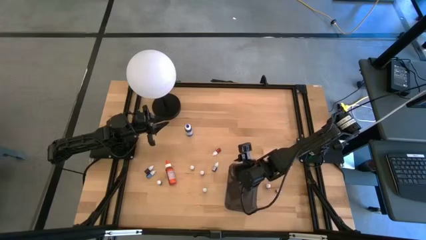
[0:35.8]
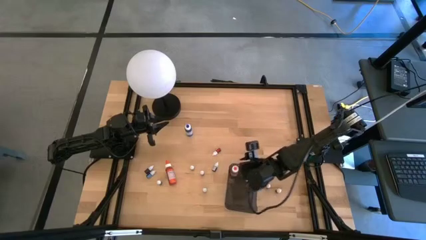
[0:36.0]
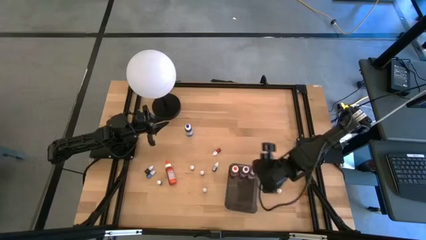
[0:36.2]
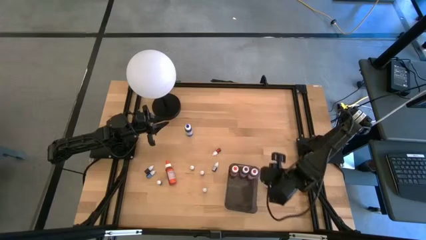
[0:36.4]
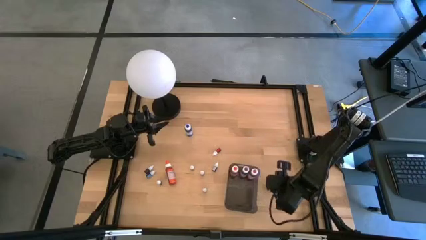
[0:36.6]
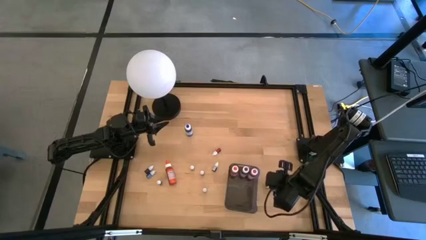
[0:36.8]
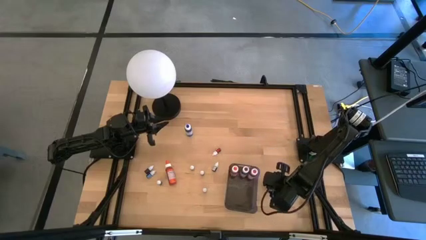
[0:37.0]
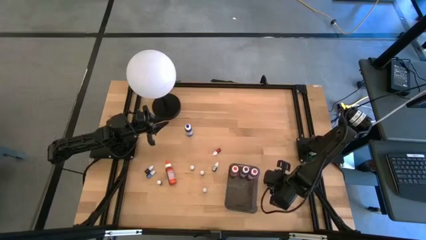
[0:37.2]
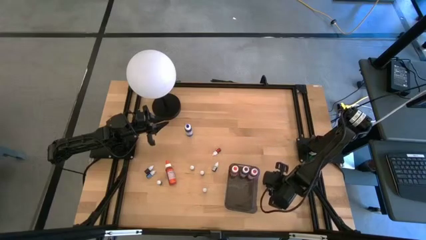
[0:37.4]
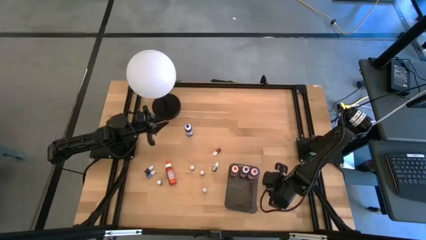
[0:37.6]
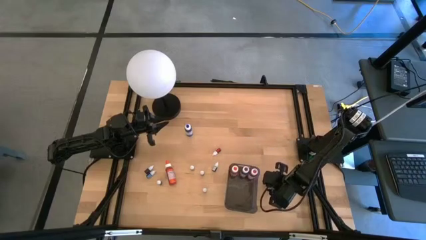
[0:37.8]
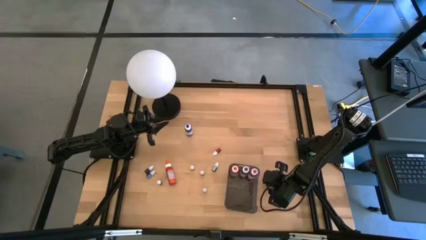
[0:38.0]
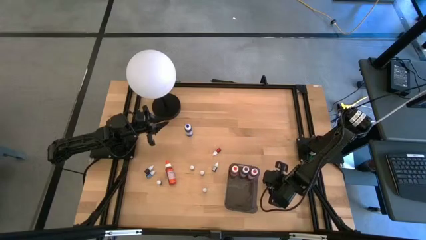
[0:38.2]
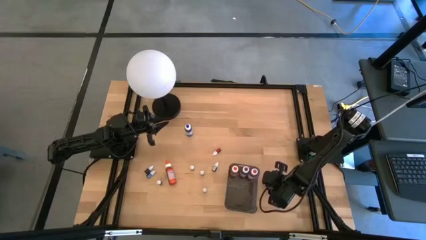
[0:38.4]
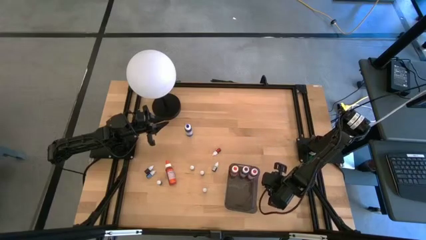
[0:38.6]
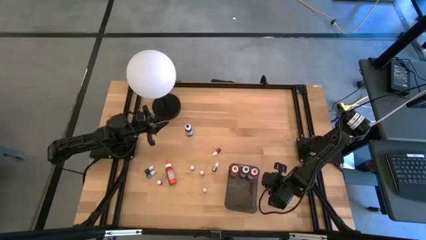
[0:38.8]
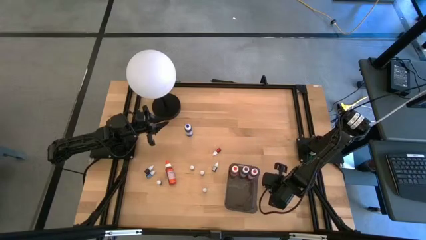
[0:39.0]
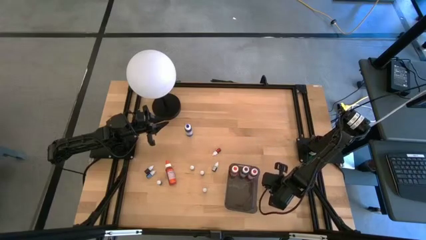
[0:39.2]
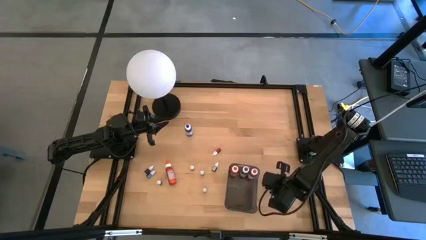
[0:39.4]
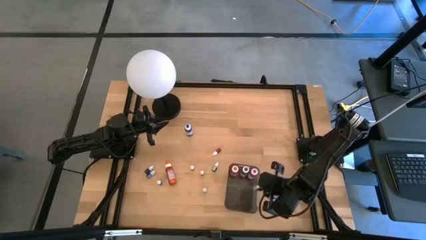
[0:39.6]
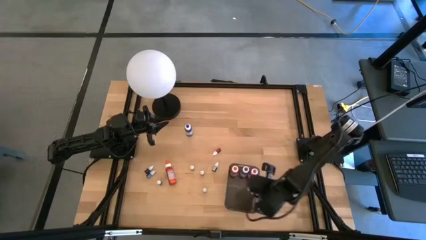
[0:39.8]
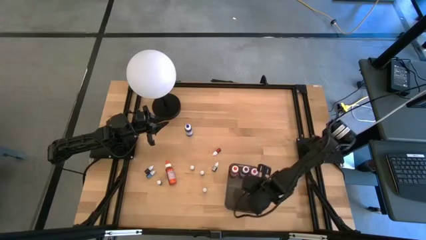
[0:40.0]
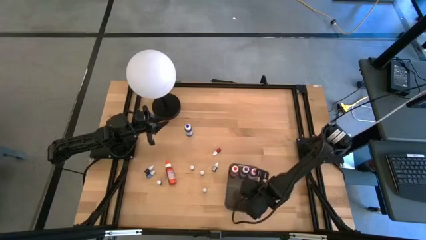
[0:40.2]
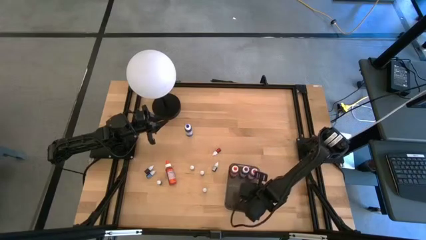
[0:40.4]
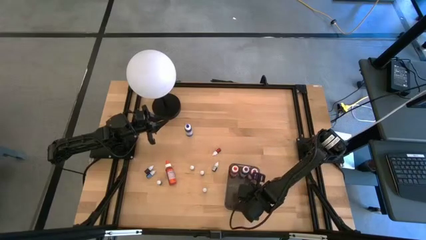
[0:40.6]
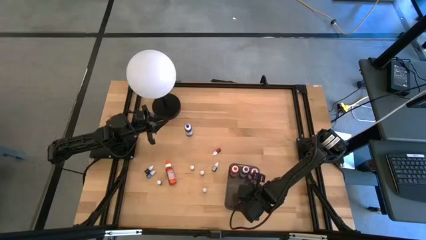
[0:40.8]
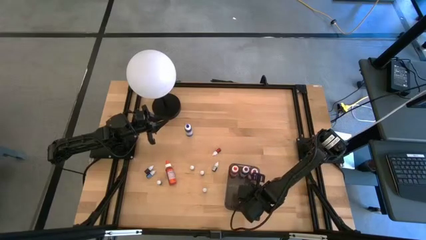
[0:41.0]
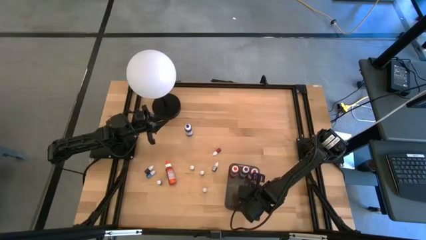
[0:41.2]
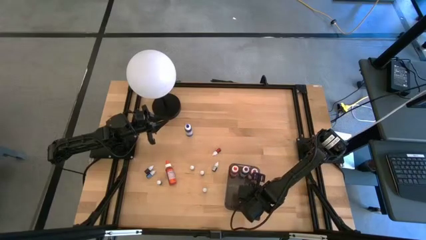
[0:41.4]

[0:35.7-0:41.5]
Task: Pick & Place food coloring
Put the small food coloring bottle into the black bin

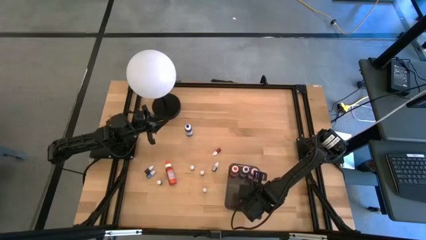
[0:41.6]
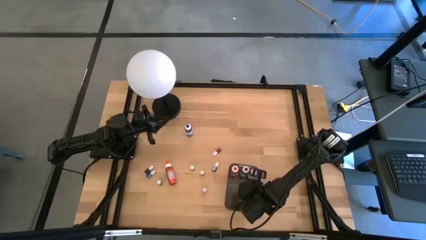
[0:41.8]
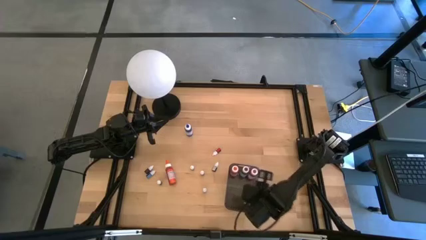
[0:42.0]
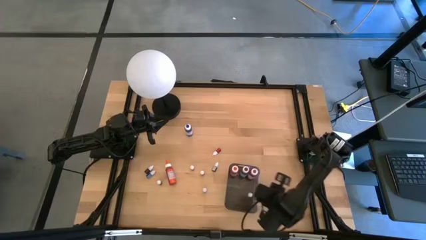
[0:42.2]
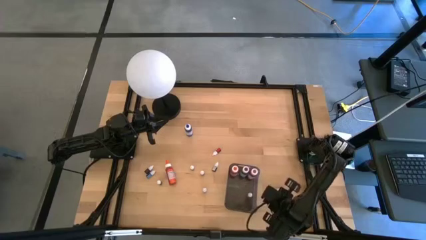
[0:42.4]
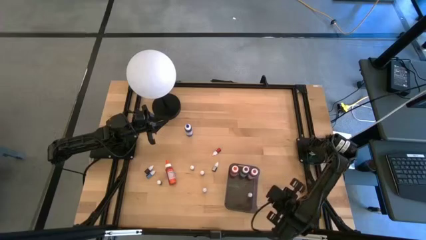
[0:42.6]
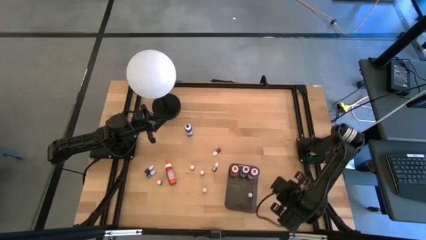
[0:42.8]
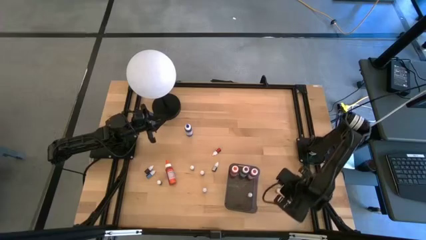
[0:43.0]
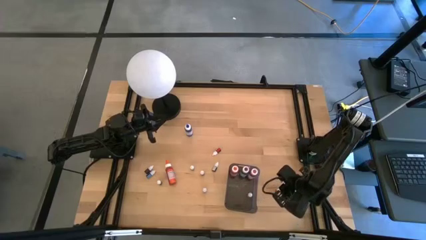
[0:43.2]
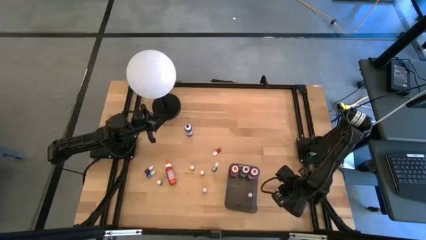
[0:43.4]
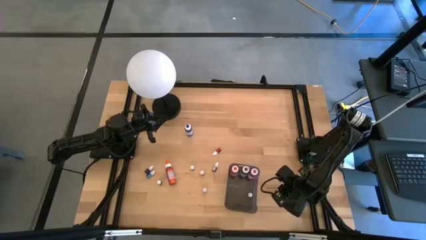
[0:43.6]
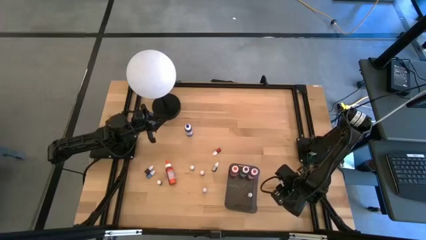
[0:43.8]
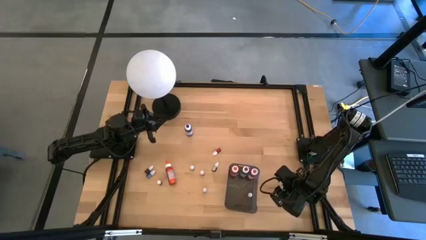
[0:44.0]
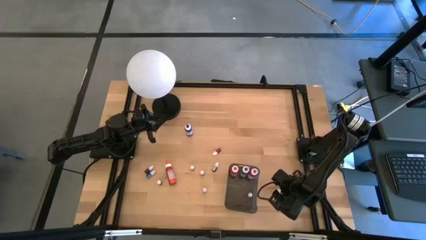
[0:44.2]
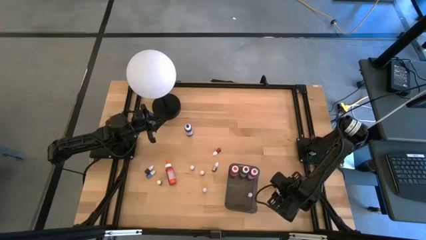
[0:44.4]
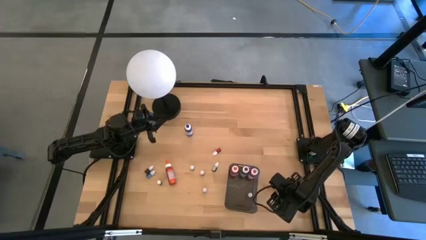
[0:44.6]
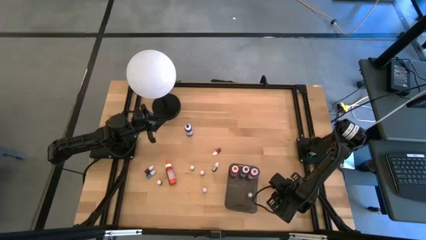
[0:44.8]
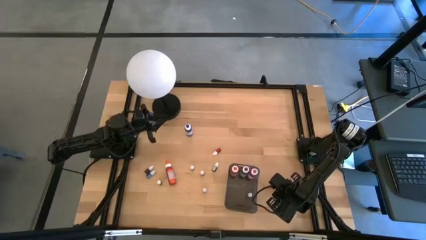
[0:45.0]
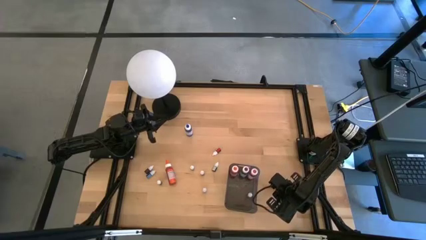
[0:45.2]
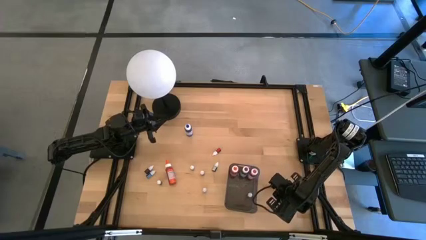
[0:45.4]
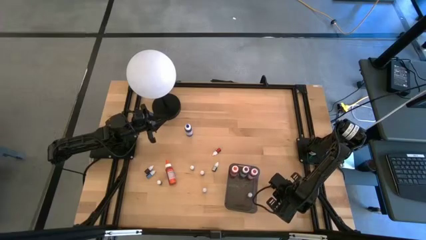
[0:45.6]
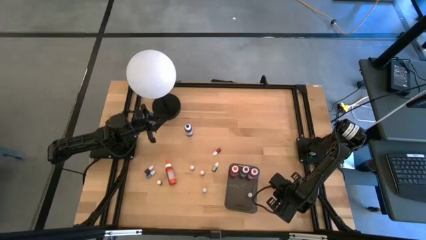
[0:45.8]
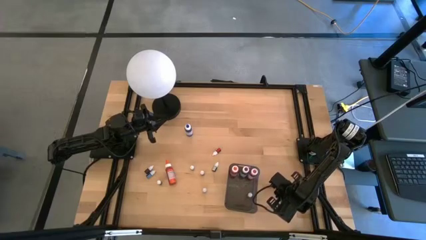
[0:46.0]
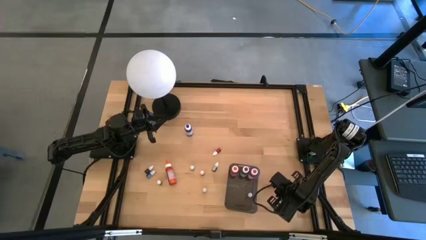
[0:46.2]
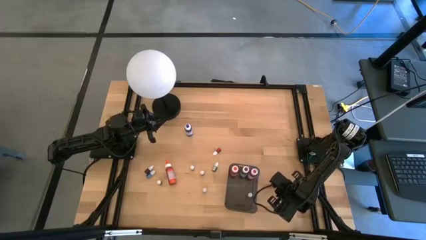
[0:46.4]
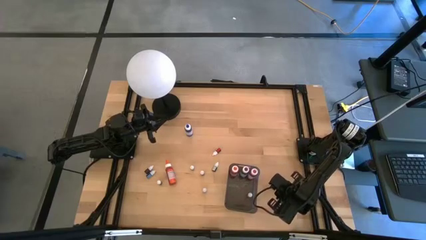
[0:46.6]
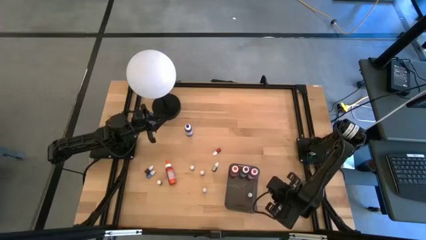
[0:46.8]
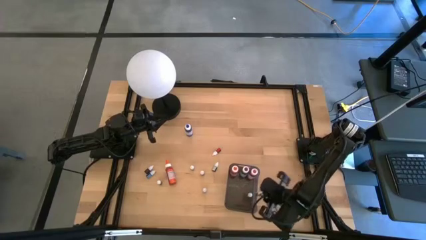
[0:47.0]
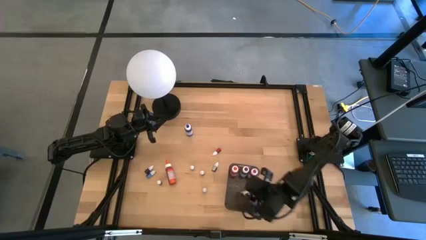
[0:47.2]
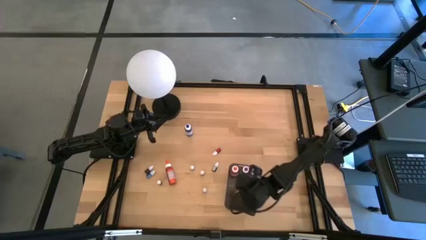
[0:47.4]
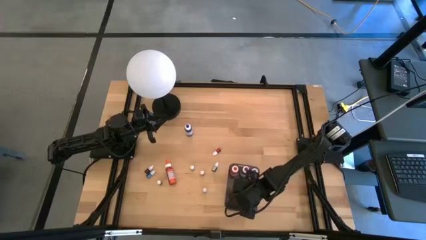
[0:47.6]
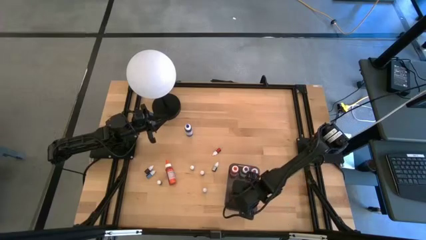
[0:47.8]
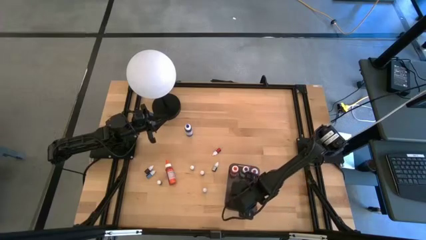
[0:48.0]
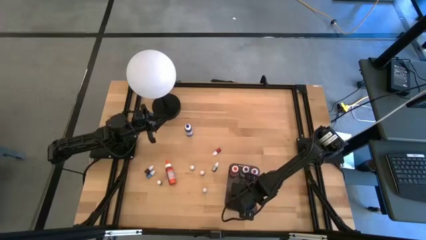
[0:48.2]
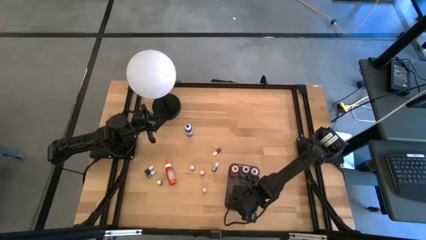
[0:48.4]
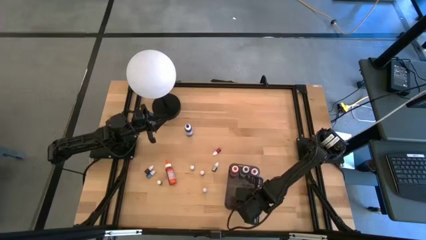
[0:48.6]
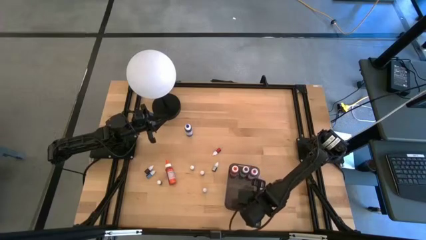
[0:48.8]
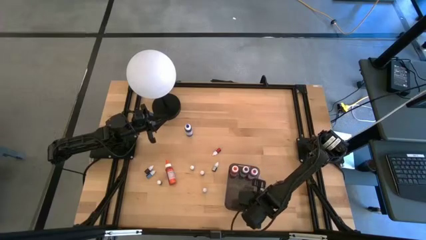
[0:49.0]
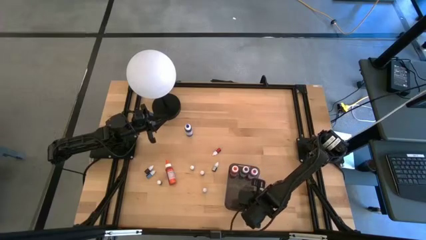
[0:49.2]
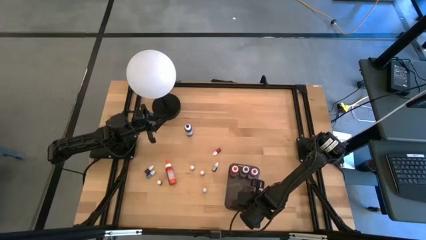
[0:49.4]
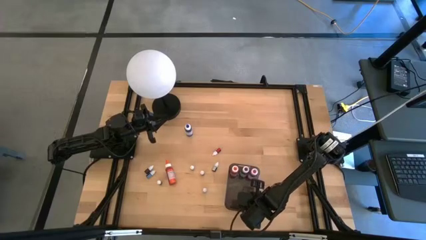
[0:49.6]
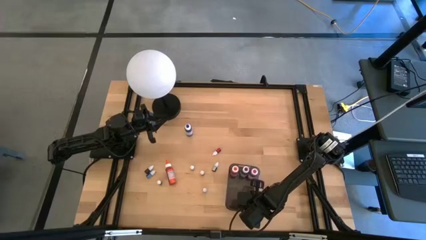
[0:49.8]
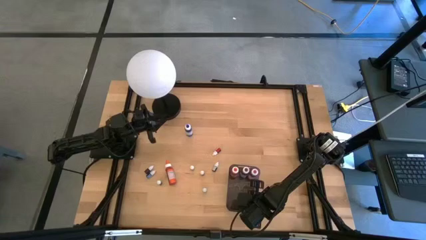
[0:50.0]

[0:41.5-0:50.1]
Put the small food coloring bottle into the black bin

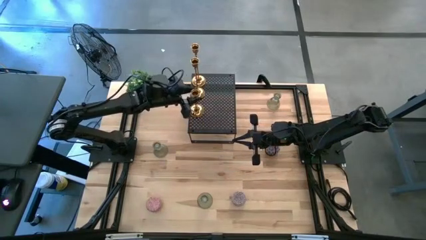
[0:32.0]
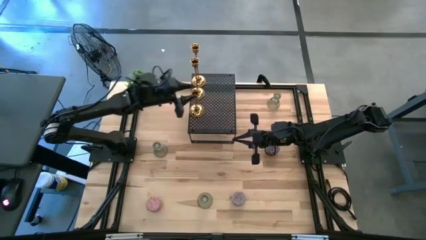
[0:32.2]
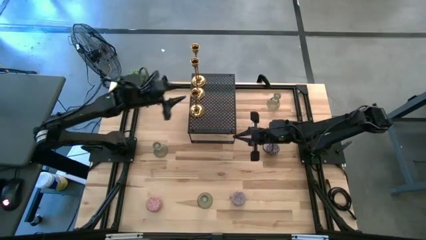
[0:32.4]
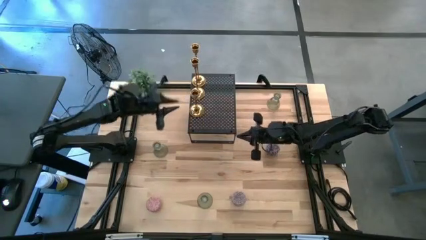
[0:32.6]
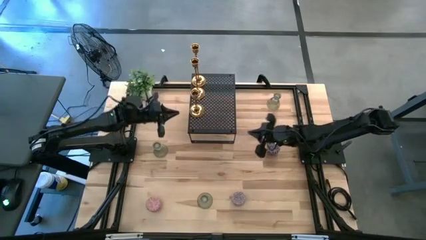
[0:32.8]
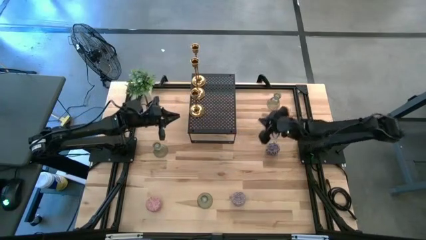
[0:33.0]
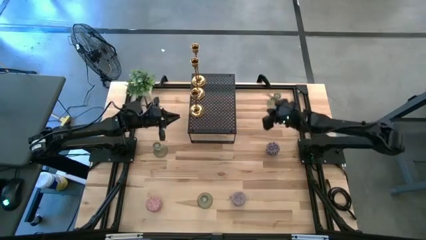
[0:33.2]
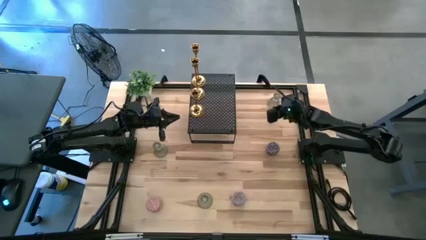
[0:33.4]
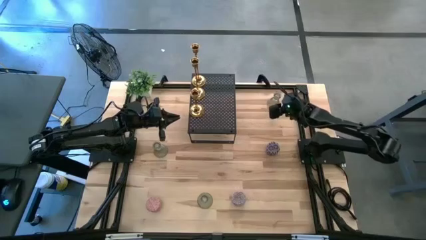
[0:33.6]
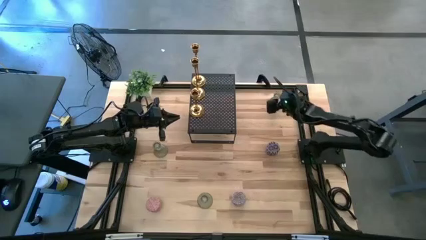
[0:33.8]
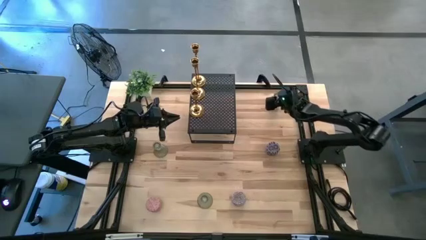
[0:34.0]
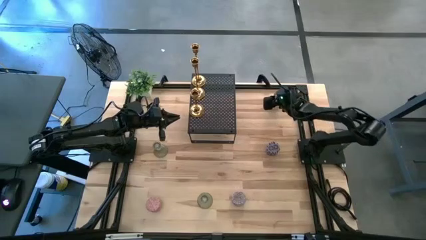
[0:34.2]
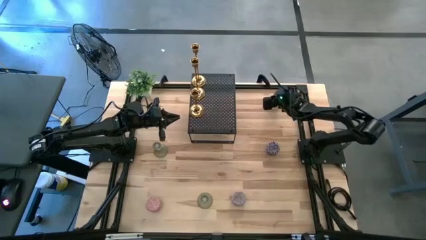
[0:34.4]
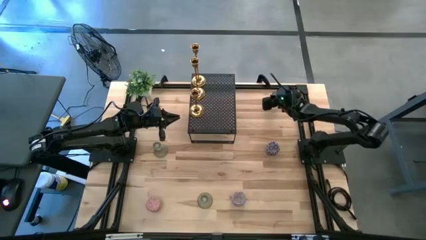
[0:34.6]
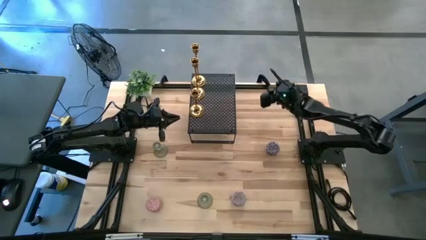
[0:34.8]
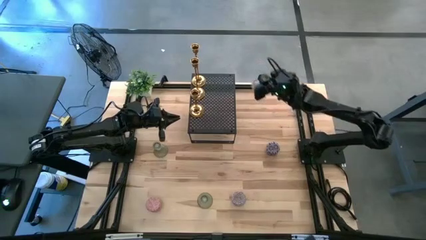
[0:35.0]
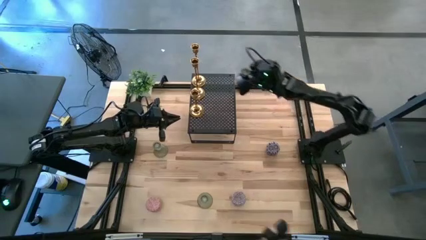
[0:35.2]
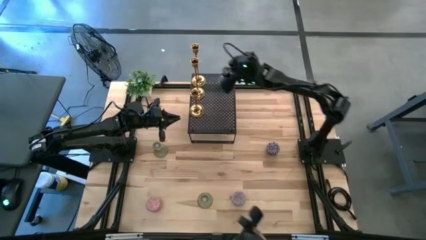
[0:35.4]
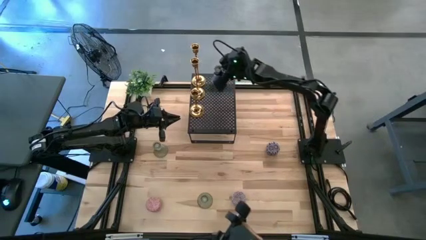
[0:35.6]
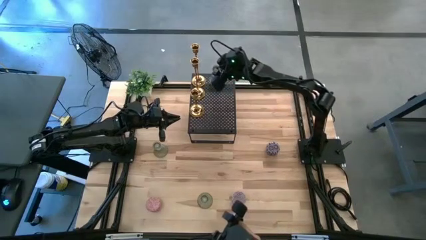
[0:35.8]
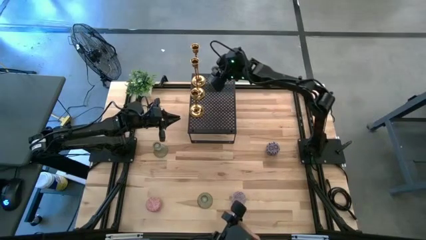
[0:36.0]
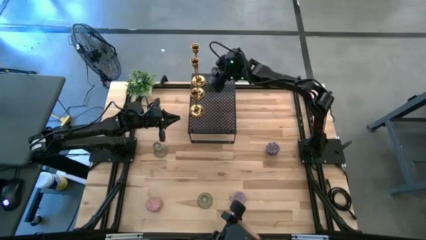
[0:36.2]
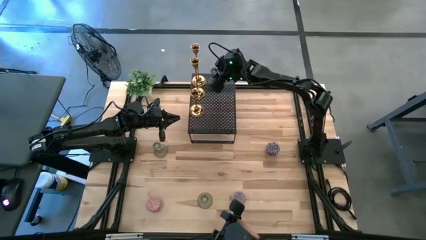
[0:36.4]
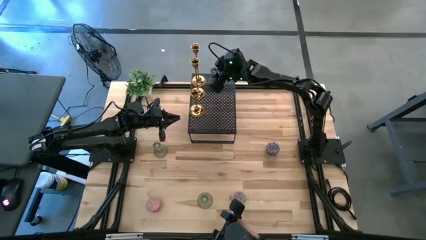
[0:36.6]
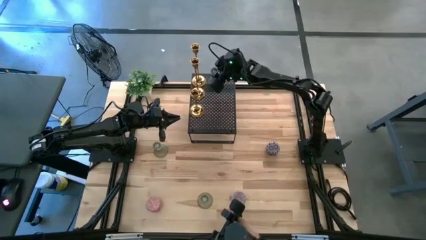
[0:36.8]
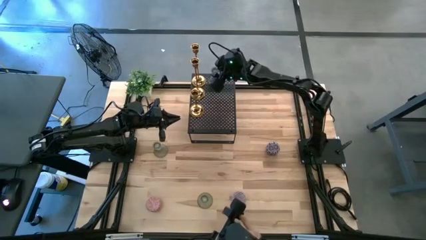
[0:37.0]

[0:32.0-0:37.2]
Task: Pick & Place candle stick holders
Put the top transparent candle holder on the shelf
